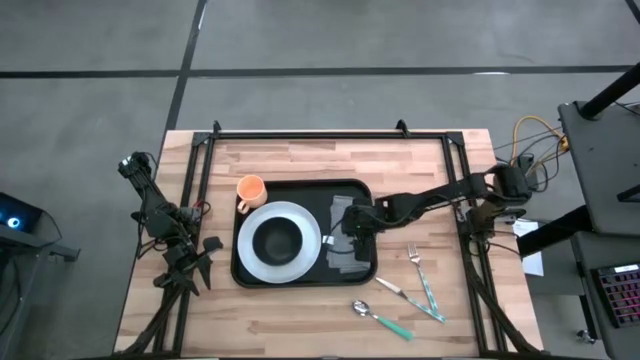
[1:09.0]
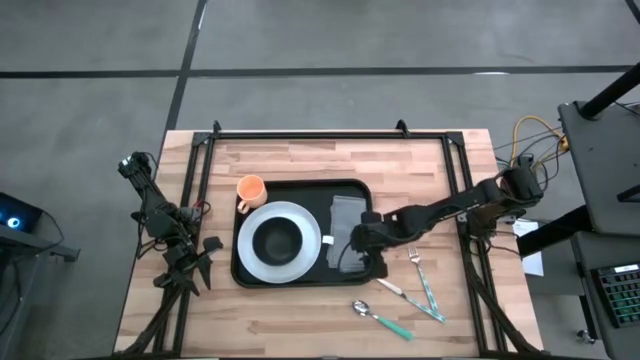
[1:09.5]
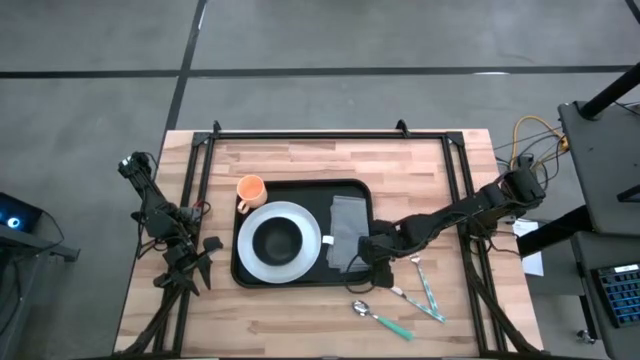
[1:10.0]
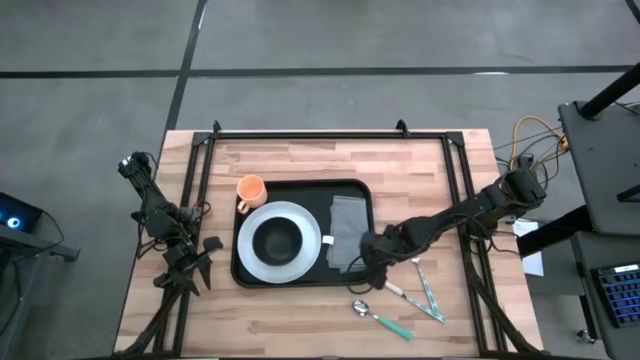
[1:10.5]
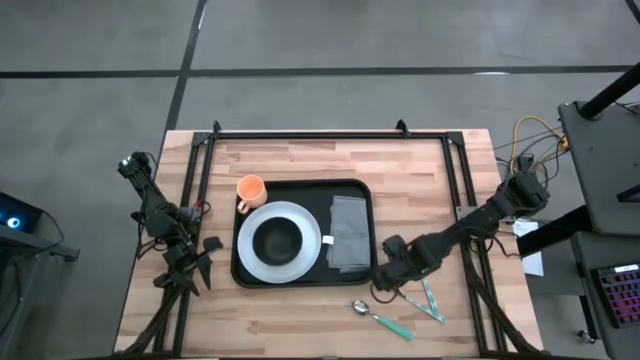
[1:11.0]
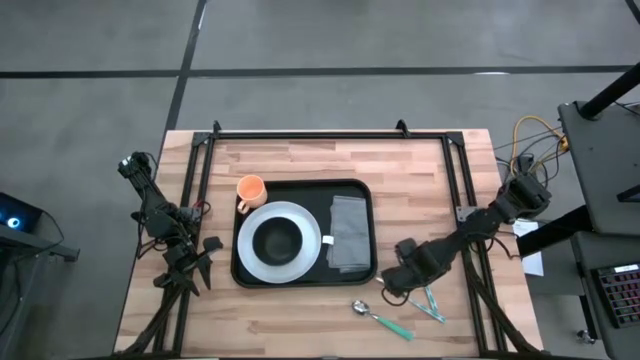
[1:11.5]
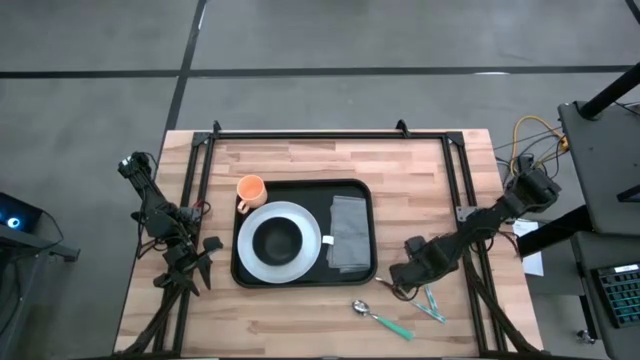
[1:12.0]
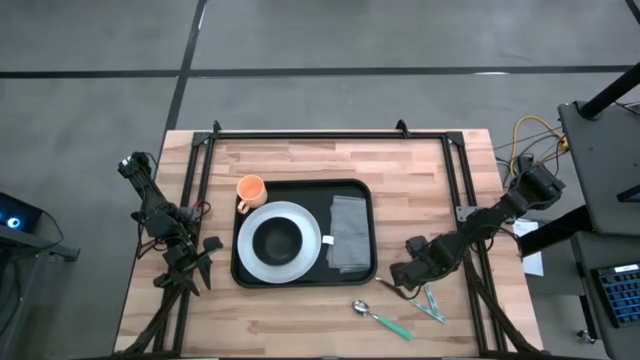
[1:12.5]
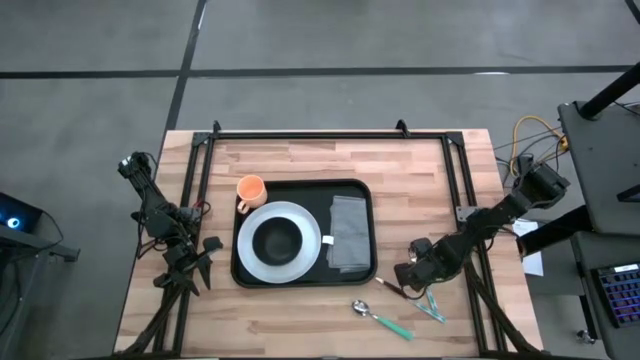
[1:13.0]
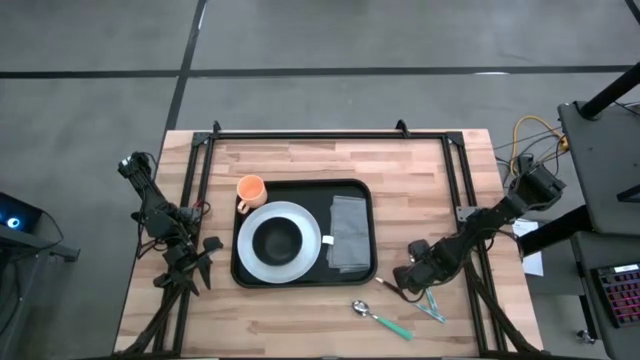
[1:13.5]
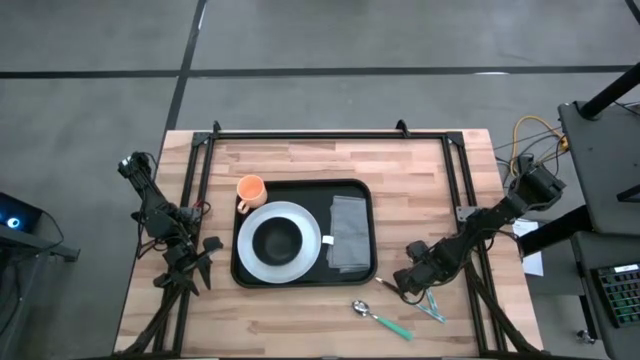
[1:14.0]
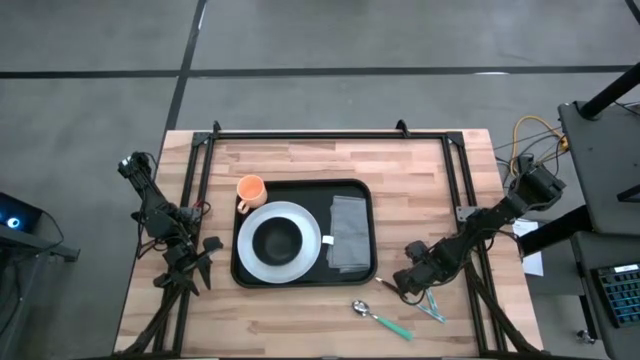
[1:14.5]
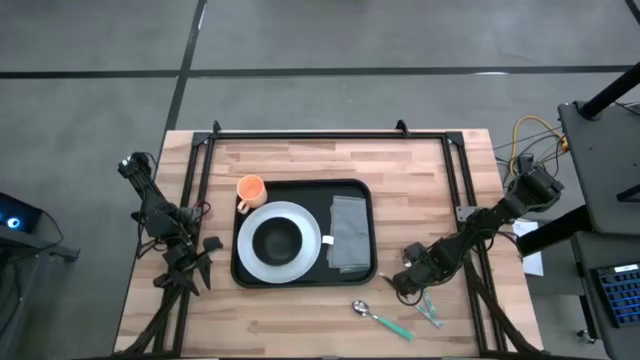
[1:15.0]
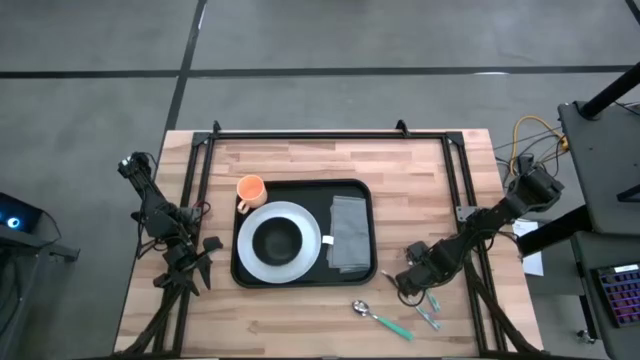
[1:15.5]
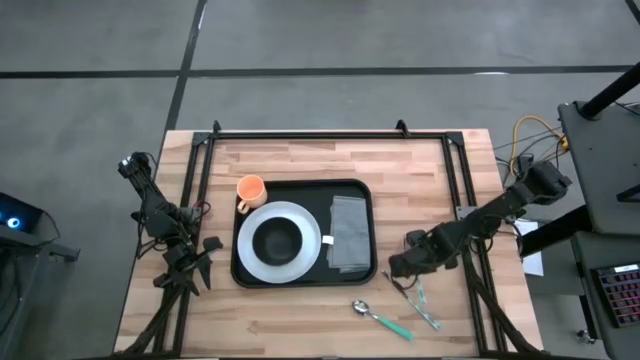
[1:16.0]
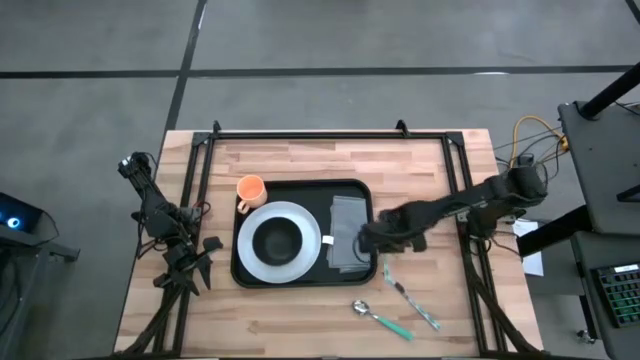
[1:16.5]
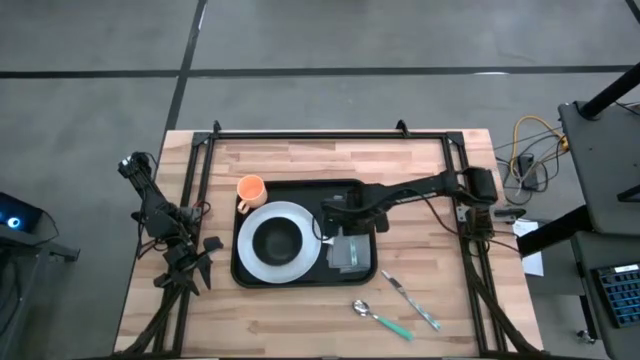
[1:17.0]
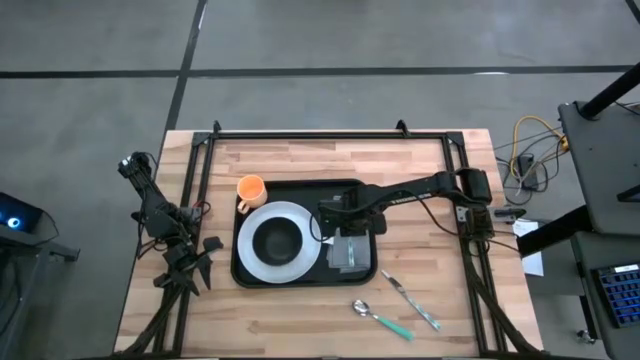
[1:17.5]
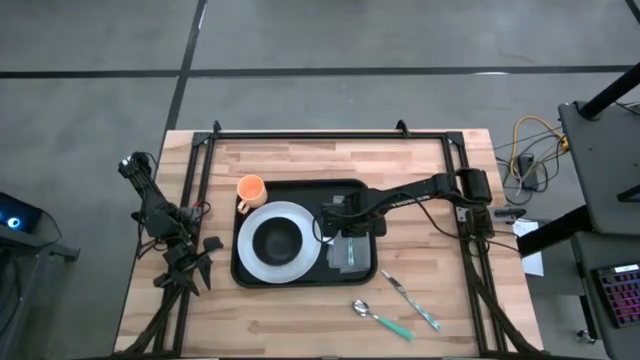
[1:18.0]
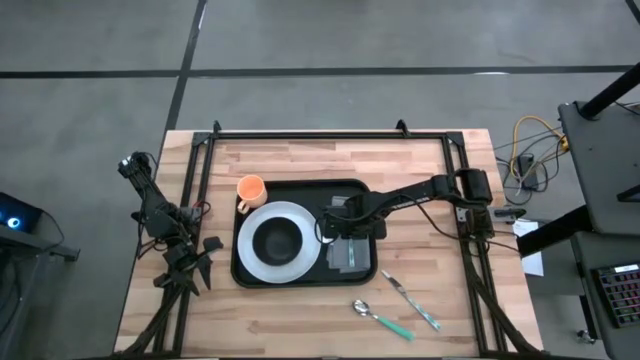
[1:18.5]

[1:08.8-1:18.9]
Task: Set up tray
Put the blue fork on the gray napkin

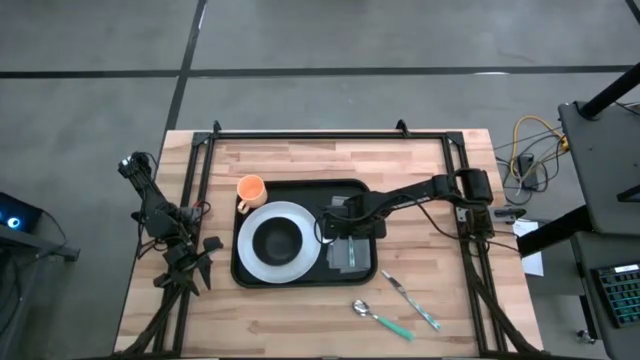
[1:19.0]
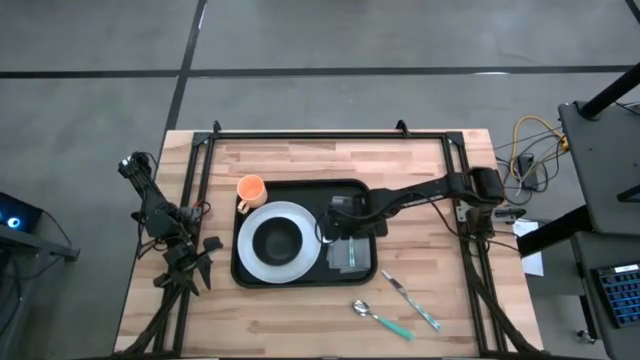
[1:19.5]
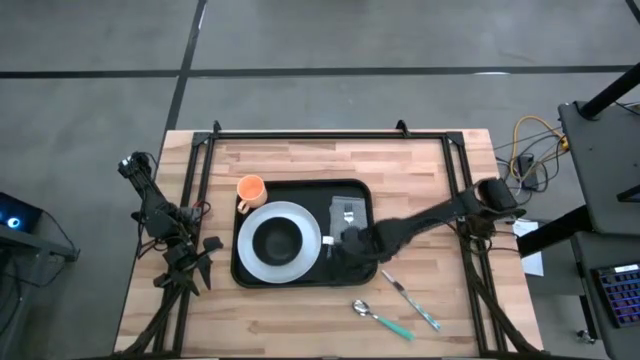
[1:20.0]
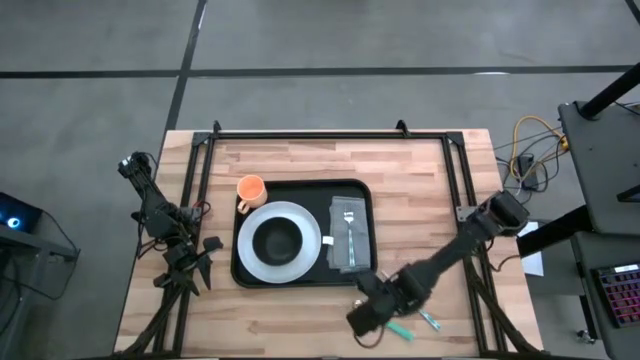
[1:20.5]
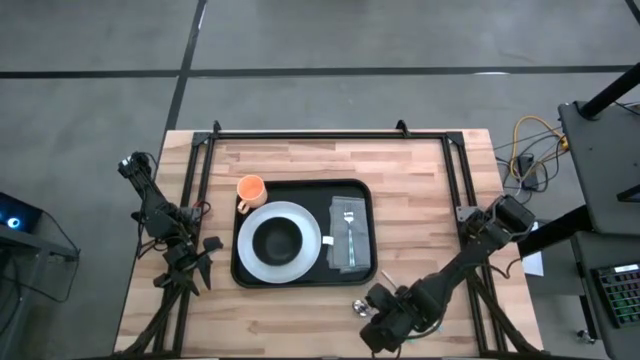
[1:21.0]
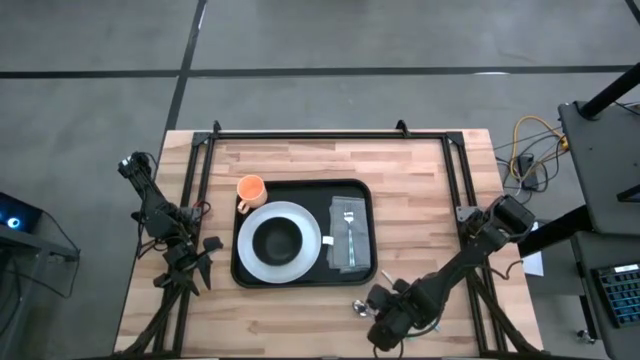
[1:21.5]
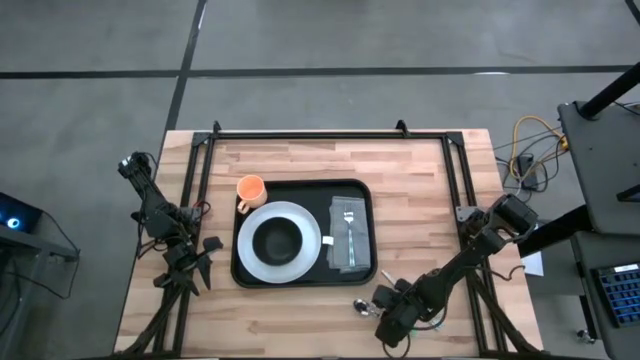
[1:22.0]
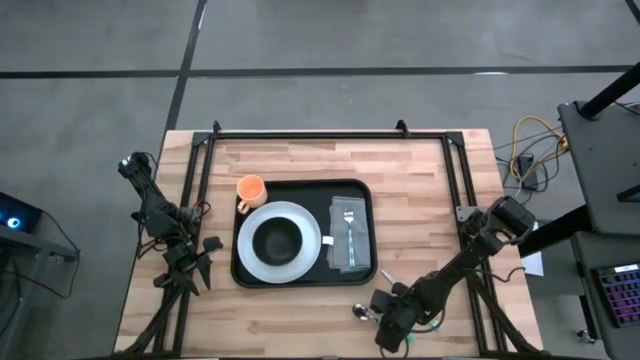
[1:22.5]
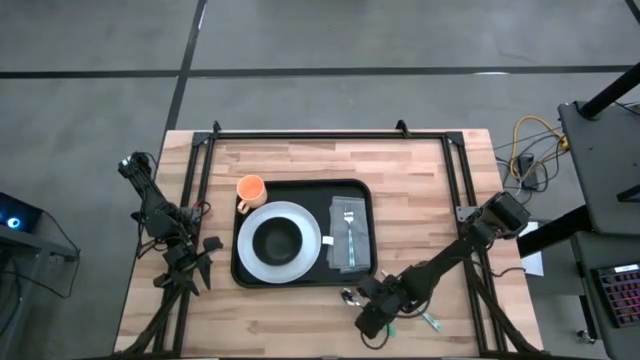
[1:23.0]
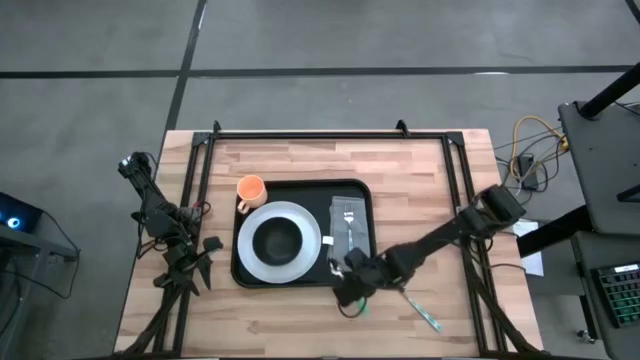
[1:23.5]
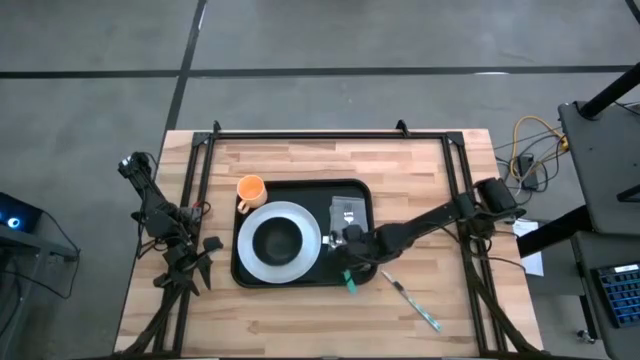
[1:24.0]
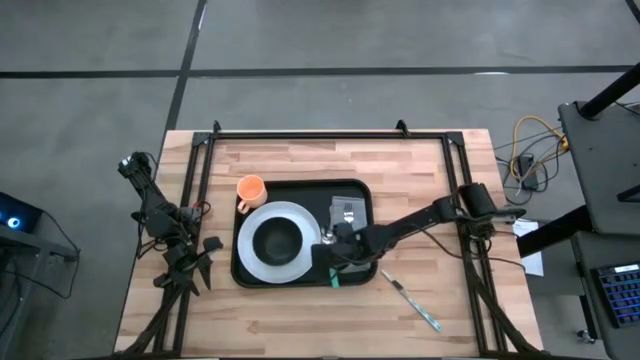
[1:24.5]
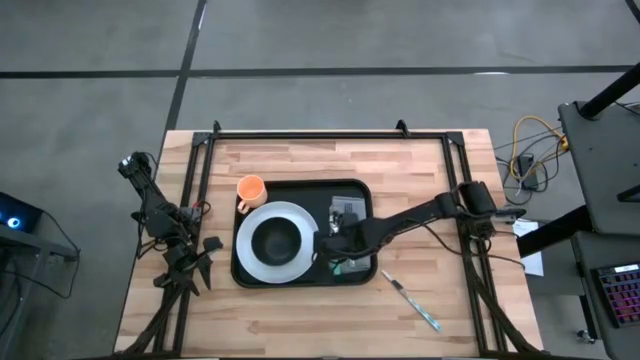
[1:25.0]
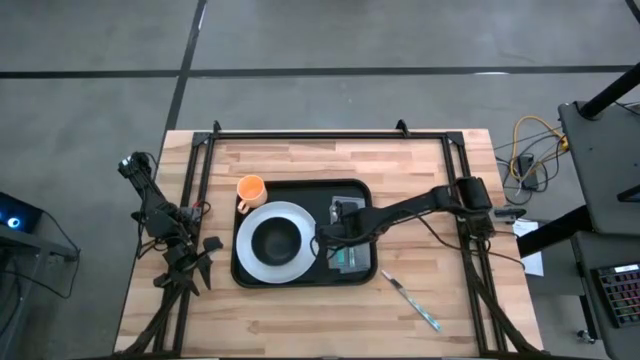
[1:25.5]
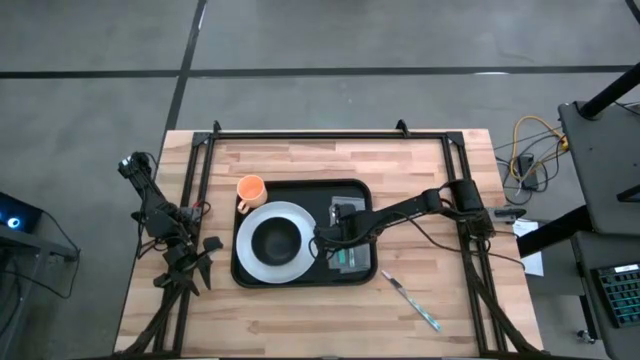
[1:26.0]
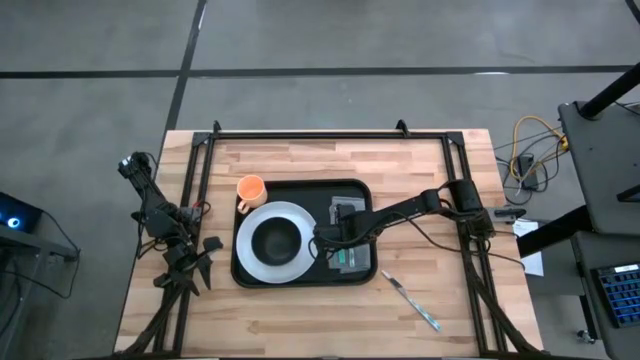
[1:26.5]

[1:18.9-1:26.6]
Put the blue spoon on the gray napkin

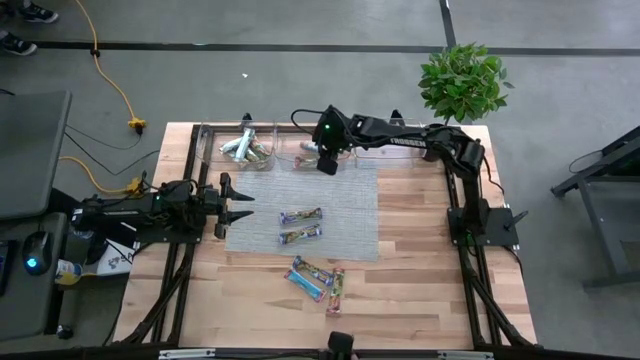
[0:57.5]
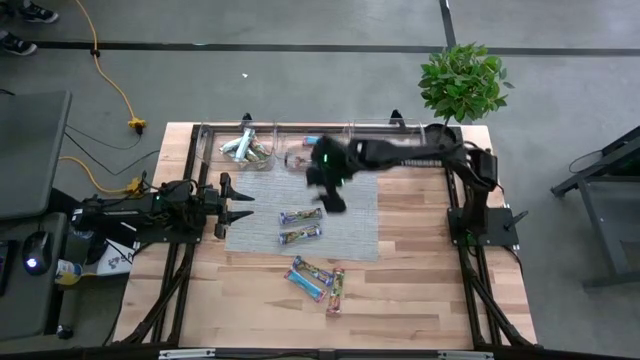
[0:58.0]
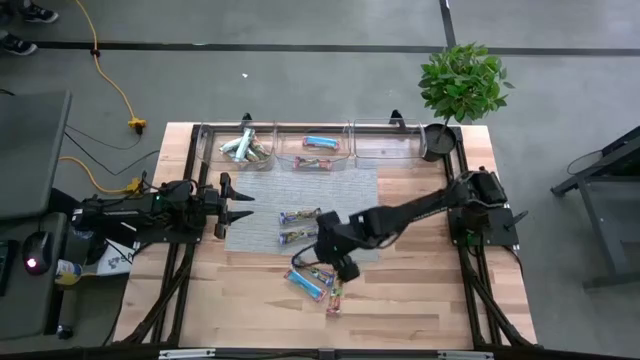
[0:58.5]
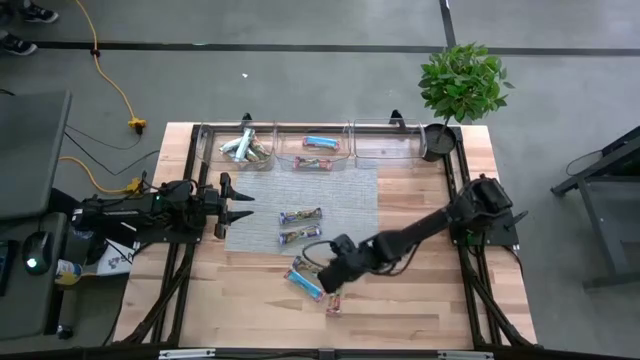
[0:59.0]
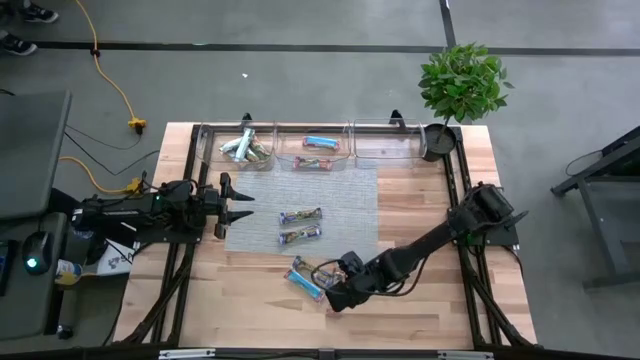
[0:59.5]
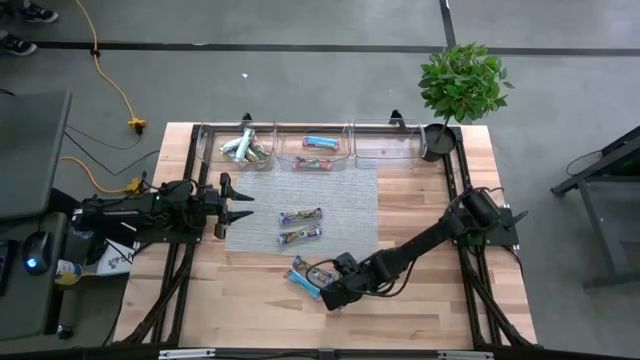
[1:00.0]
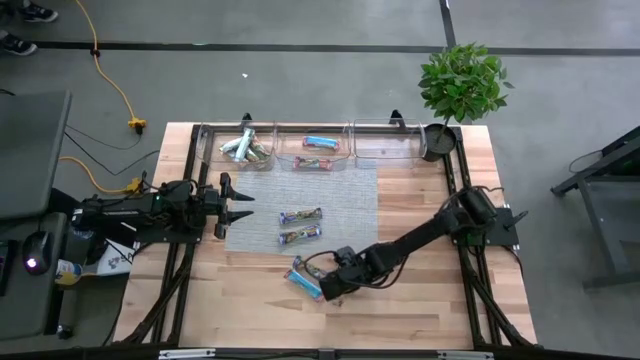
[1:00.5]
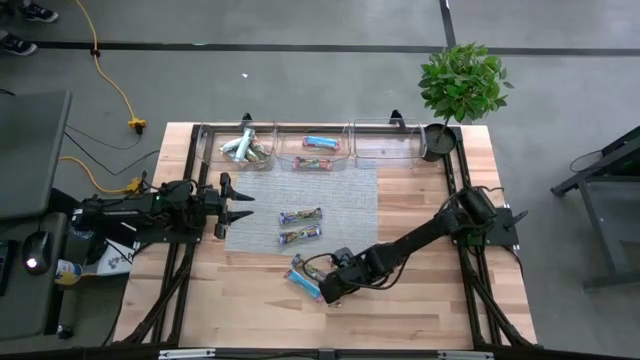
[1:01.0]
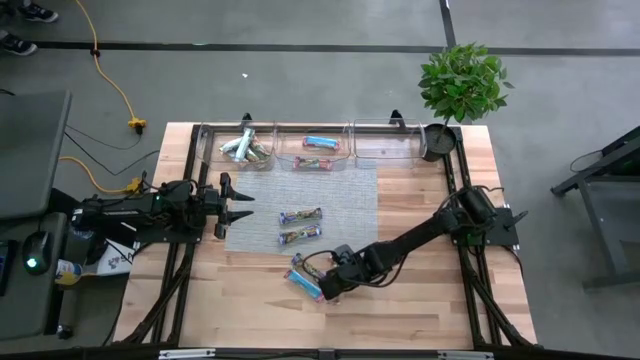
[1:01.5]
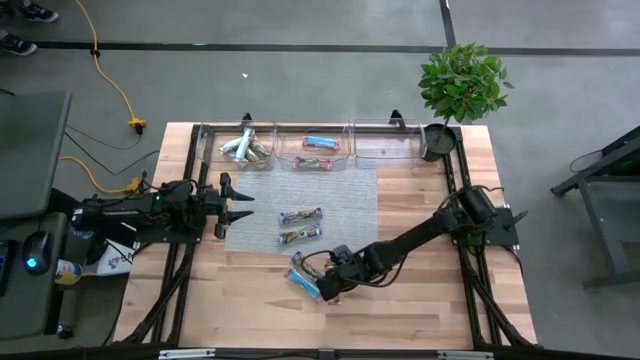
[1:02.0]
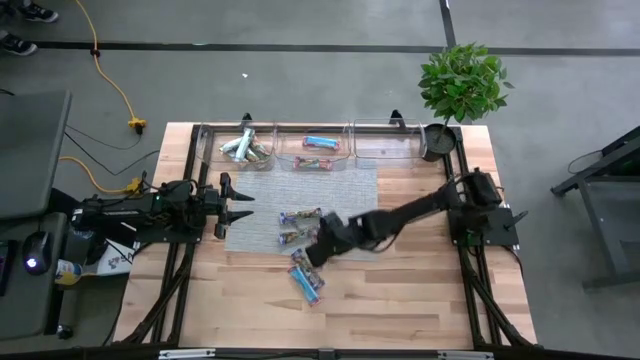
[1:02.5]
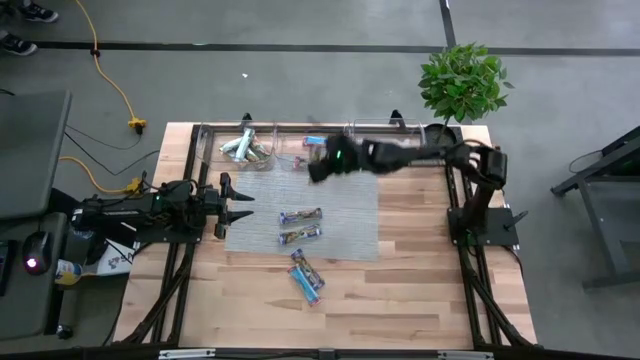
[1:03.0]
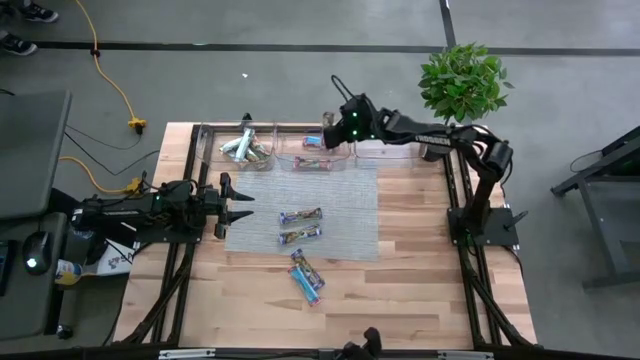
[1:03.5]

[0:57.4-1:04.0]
Task: Pick and place Granola Bars by type
Put the red granola bar into the middle transparent bin
